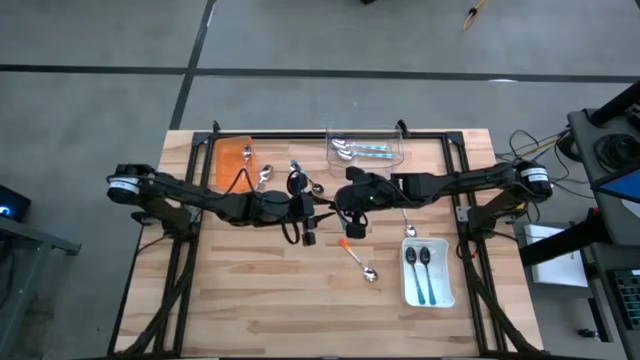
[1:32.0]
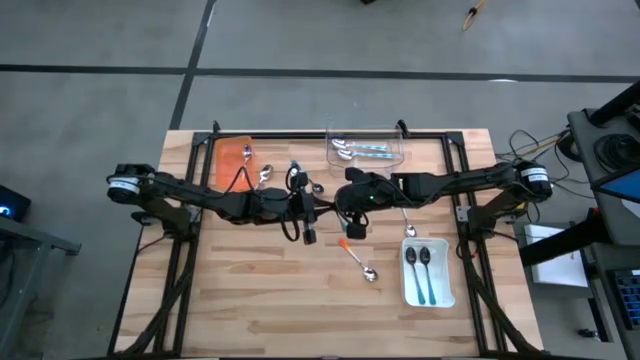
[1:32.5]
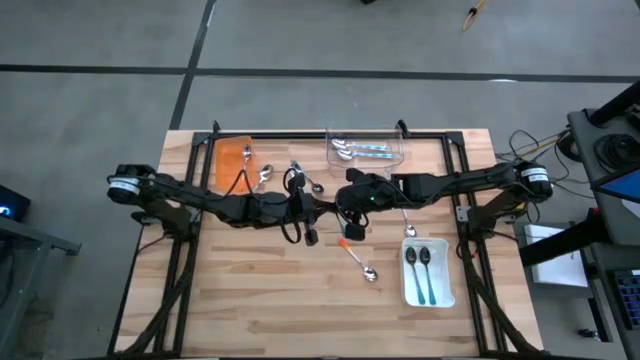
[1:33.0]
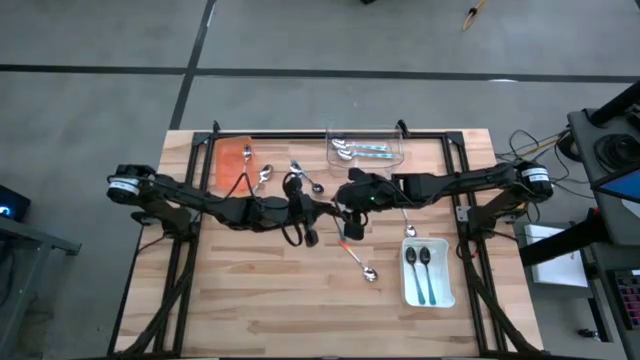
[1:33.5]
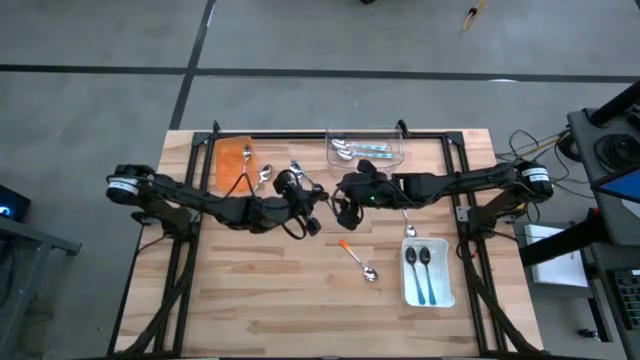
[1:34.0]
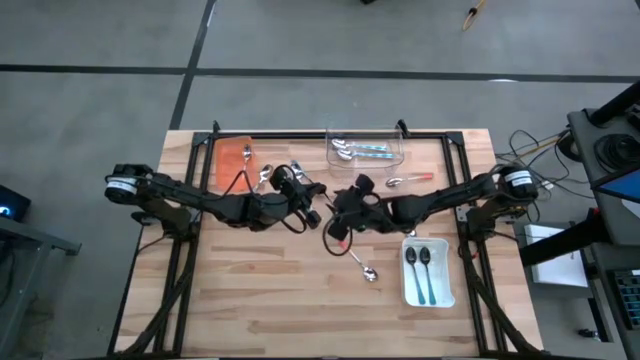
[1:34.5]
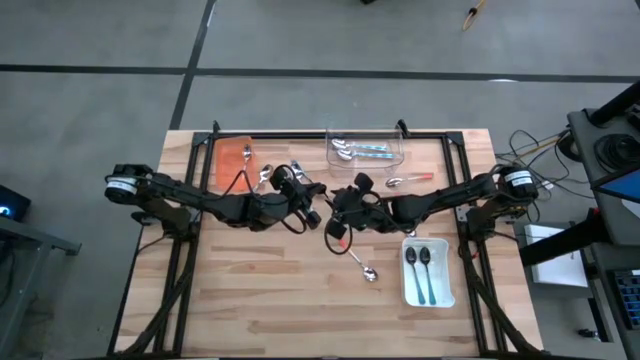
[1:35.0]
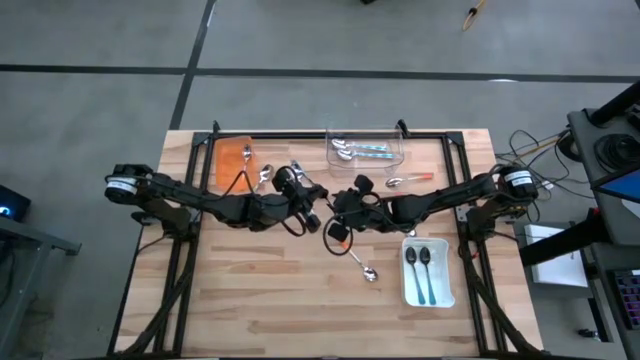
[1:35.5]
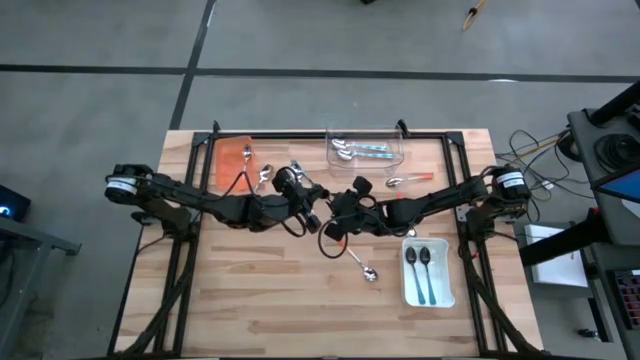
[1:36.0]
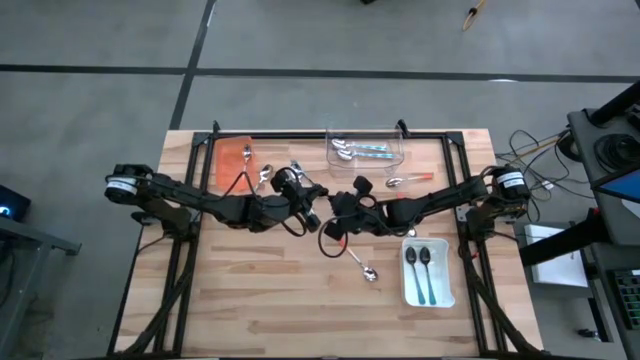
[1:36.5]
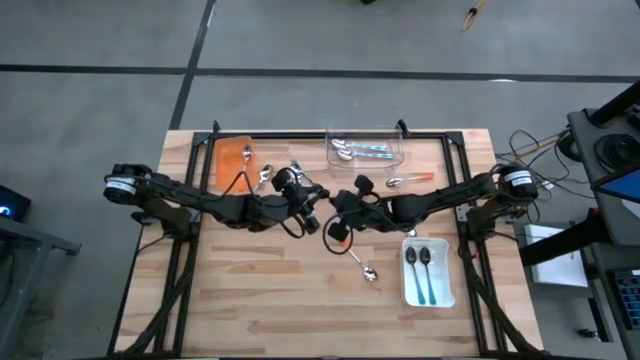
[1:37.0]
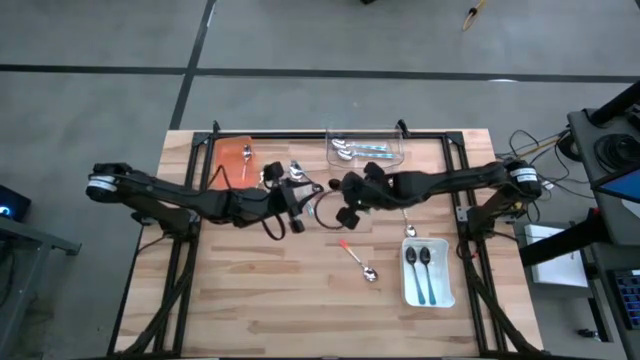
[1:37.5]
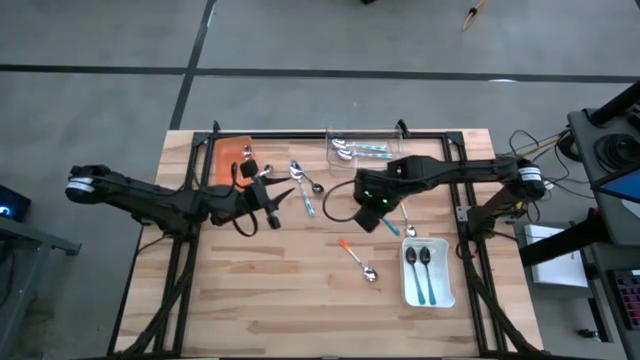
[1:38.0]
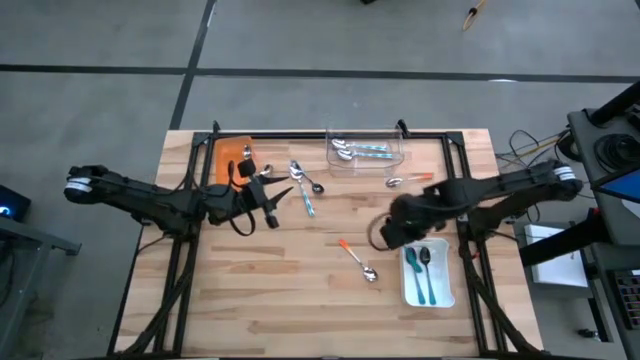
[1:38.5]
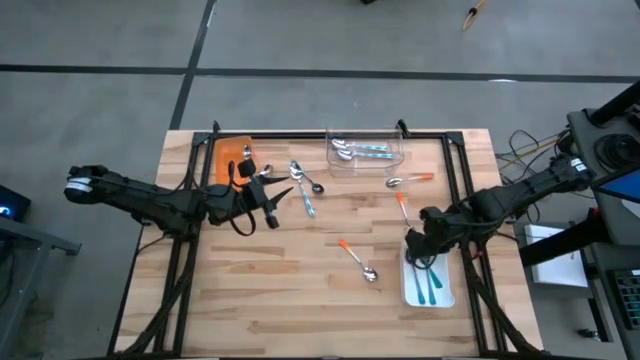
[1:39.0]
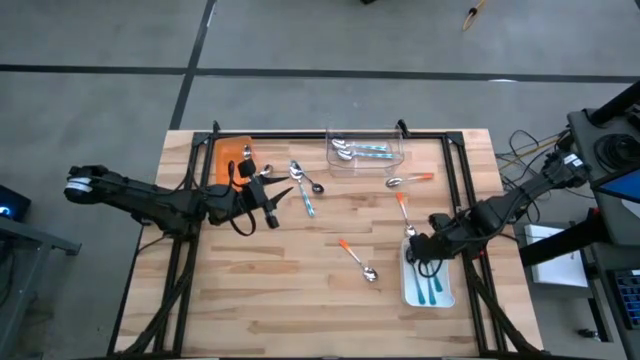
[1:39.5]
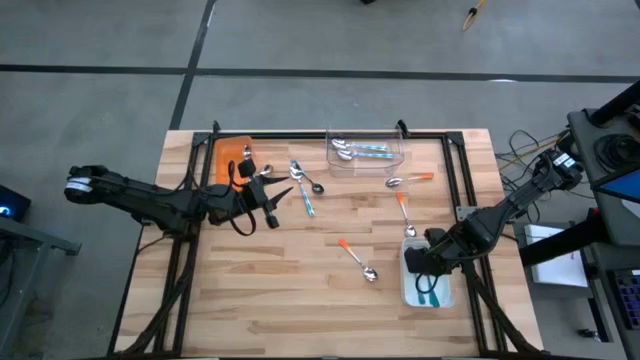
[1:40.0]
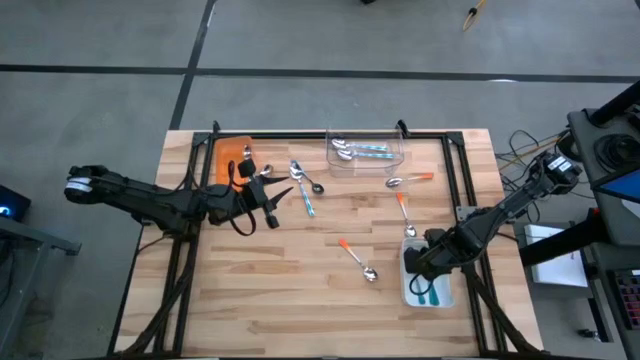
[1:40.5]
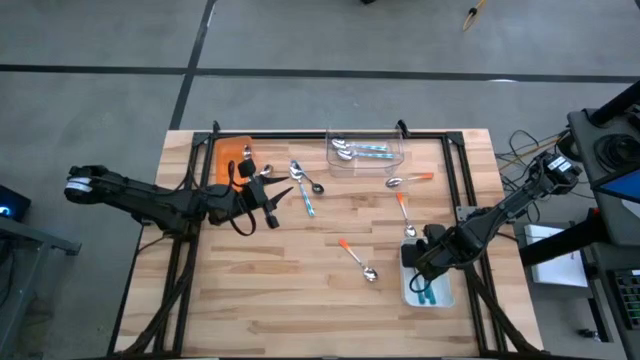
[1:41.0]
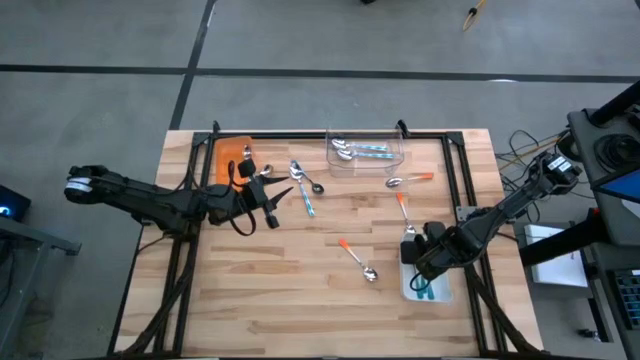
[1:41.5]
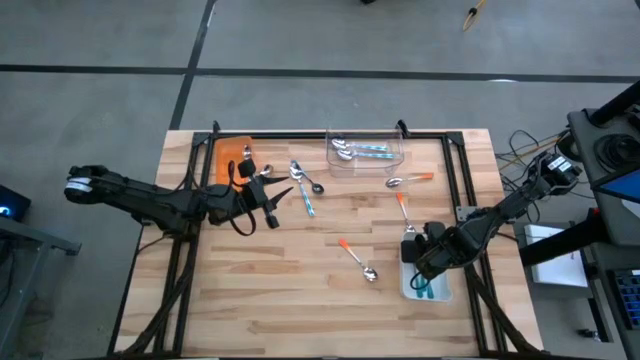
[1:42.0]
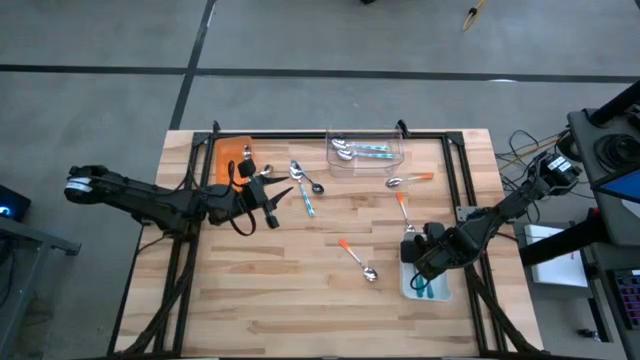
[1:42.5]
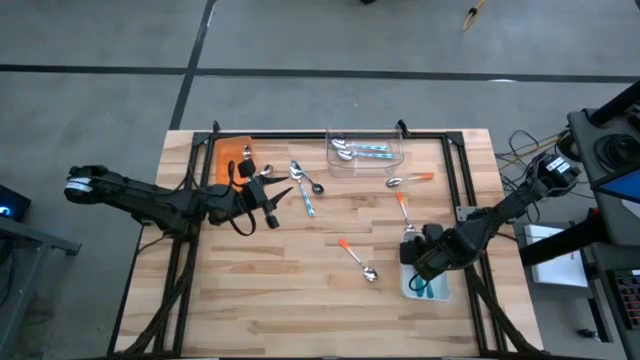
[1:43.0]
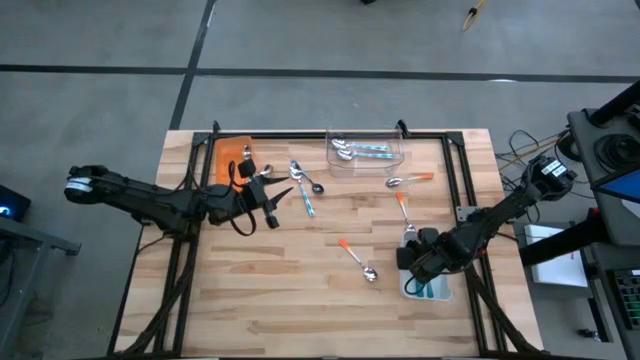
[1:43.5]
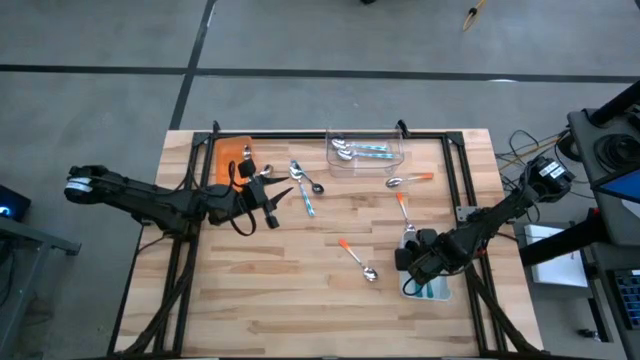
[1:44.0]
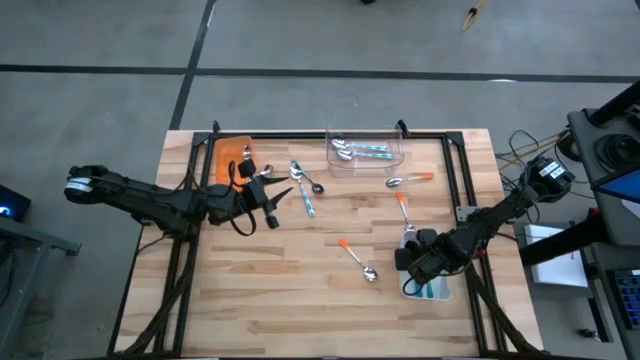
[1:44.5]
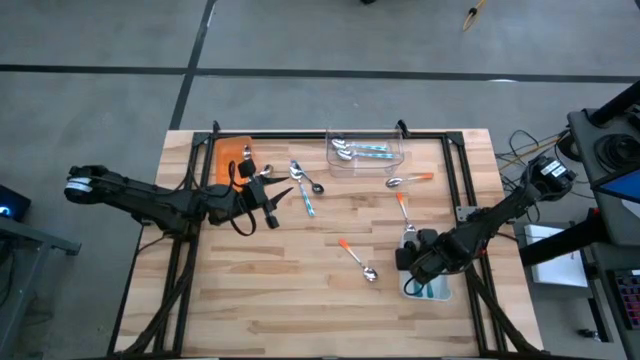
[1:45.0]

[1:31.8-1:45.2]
Task: Sort silverware by color (type)
Put the blue spoon into the white bin

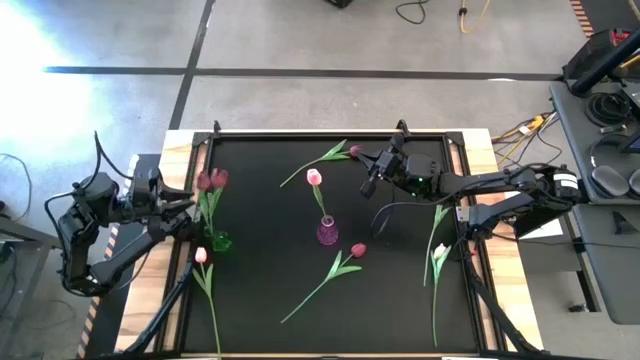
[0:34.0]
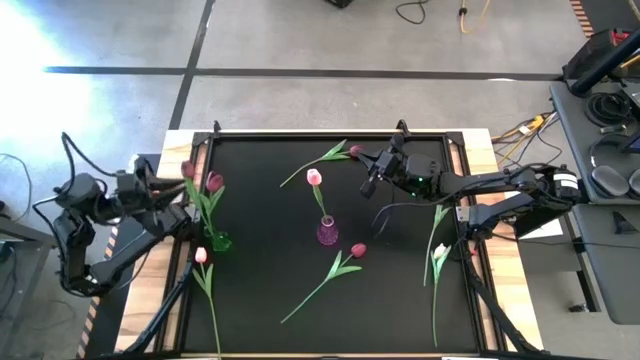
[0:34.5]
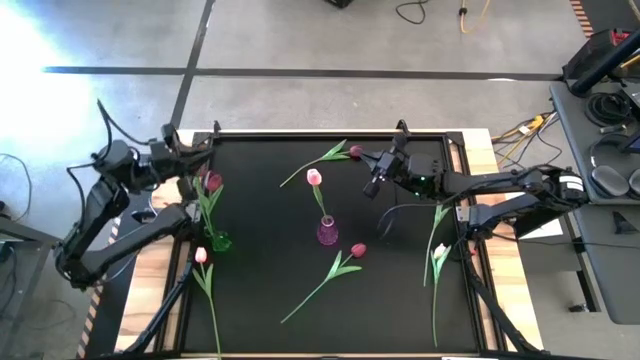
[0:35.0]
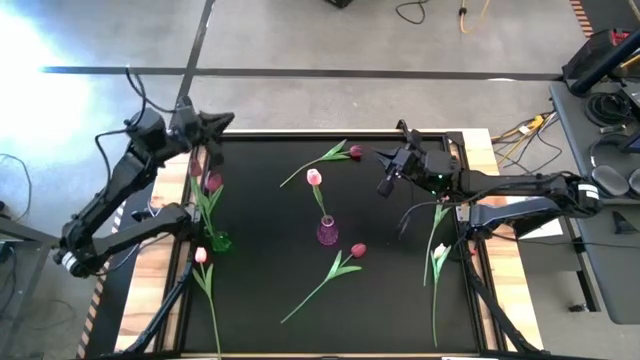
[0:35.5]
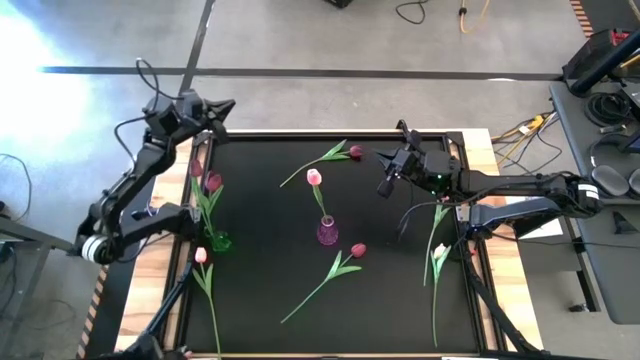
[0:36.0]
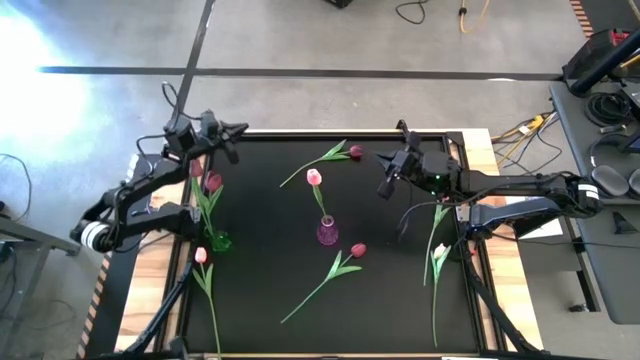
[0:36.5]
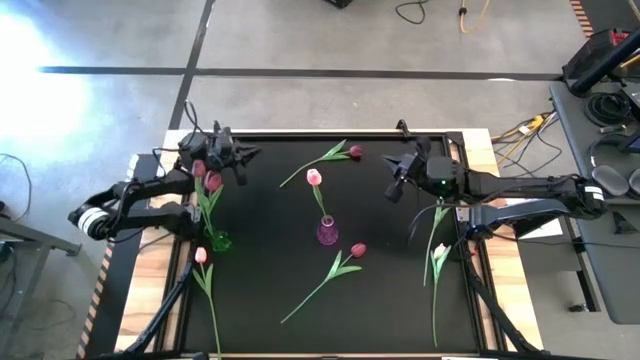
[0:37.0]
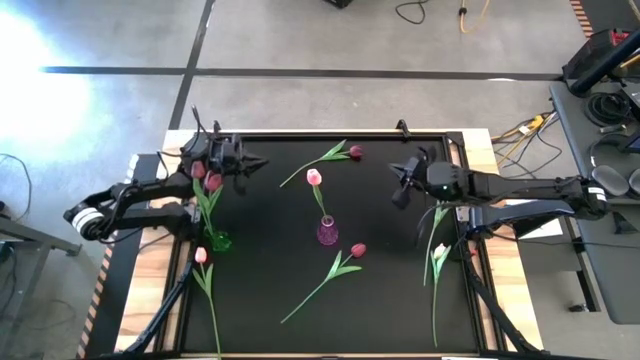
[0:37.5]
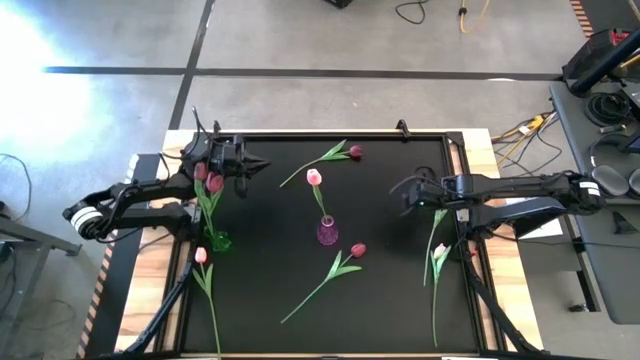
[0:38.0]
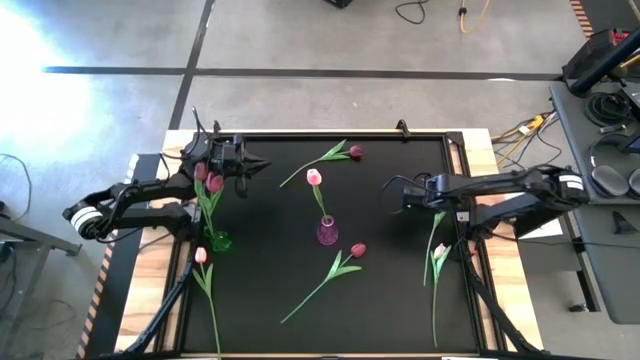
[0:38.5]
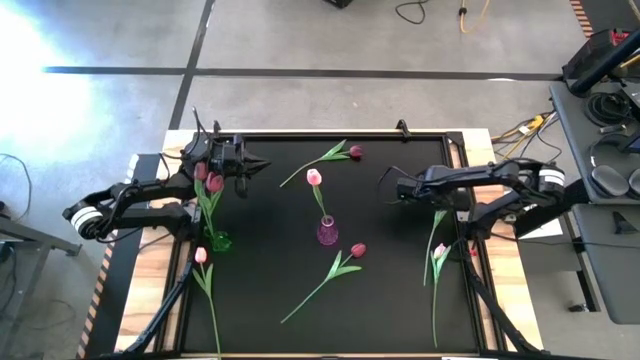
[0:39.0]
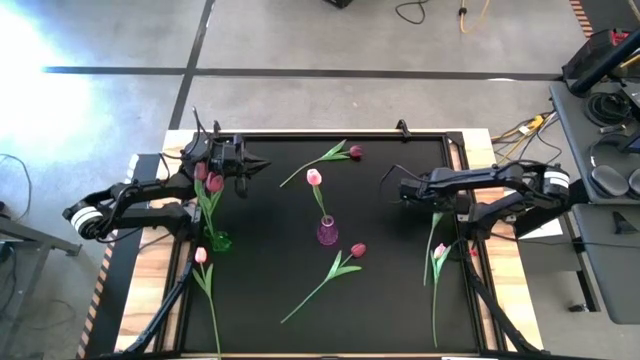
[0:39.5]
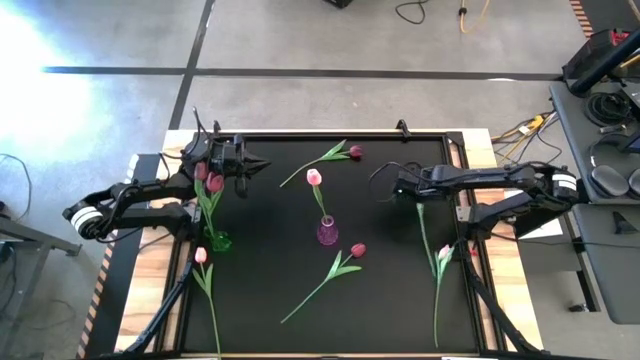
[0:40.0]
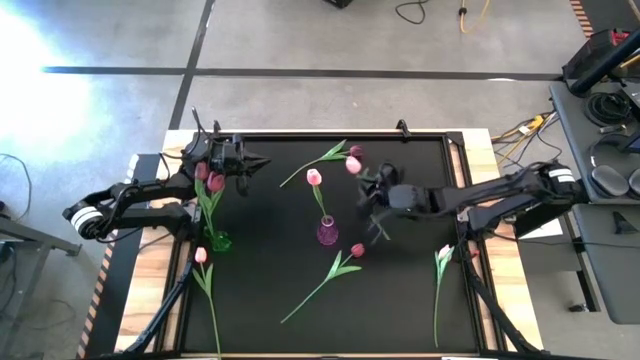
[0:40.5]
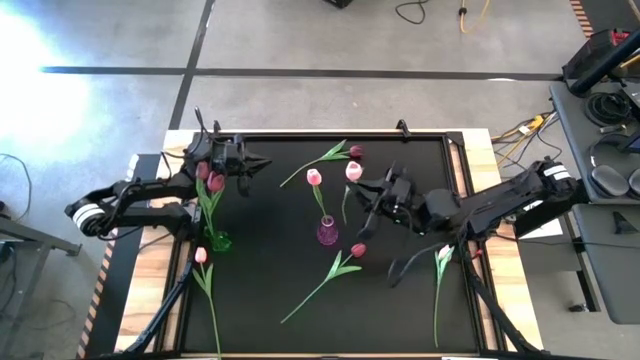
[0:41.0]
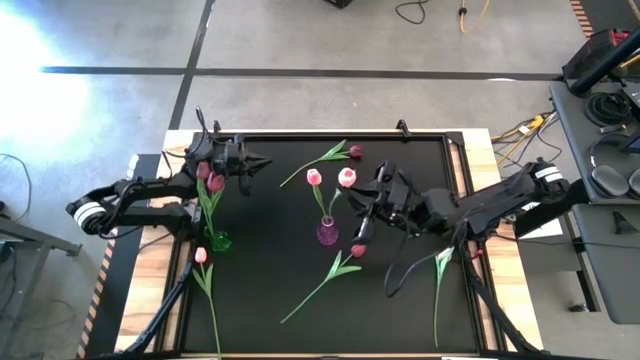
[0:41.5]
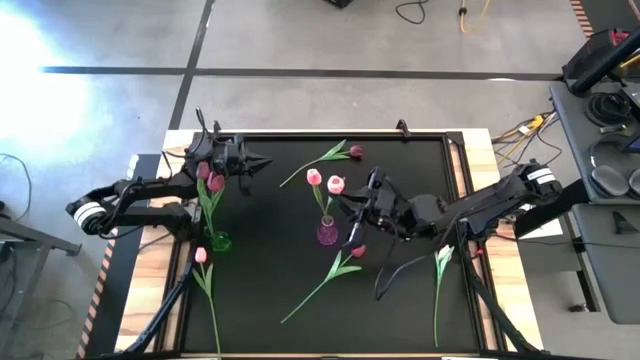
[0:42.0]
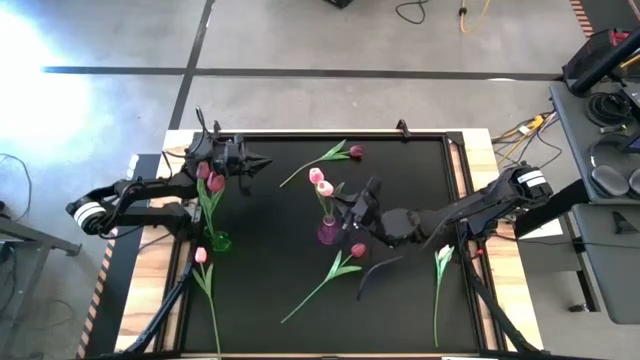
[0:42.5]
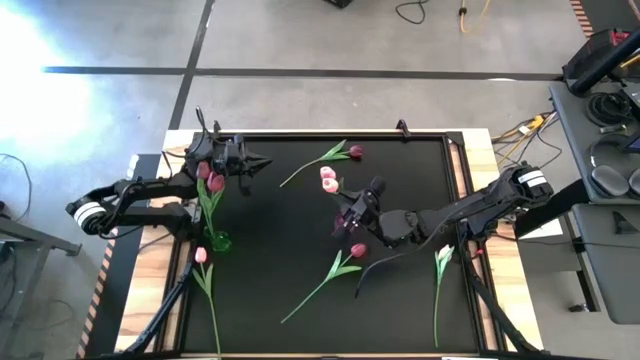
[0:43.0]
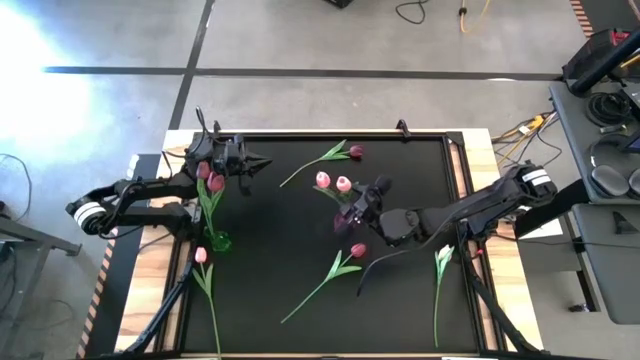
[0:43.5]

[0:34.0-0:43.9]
Task: Sort flowers into vase by color
Put the pink tulip into the purple vase
